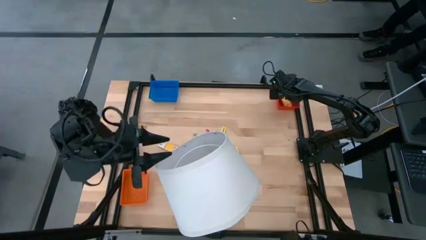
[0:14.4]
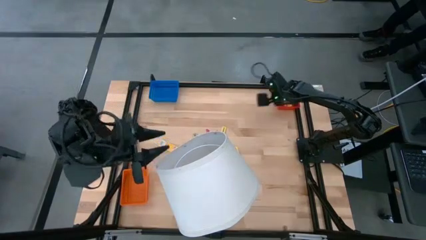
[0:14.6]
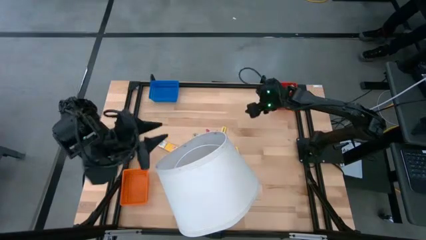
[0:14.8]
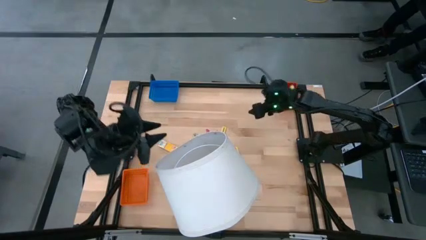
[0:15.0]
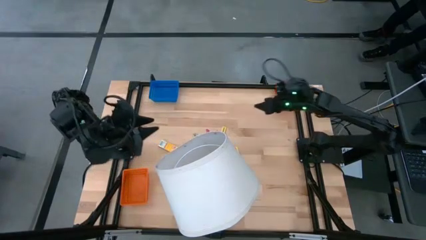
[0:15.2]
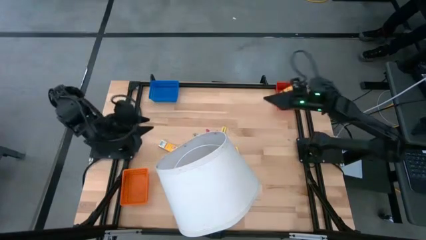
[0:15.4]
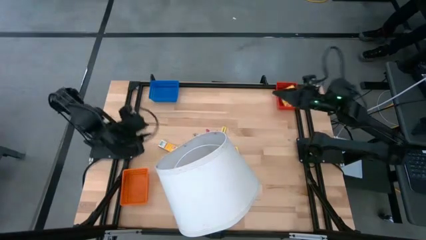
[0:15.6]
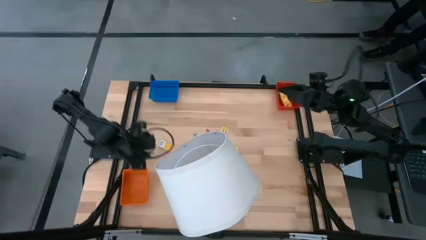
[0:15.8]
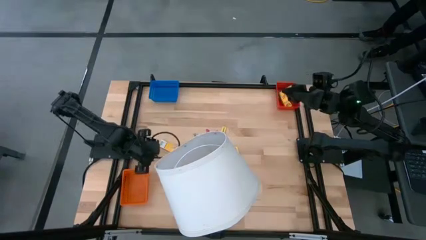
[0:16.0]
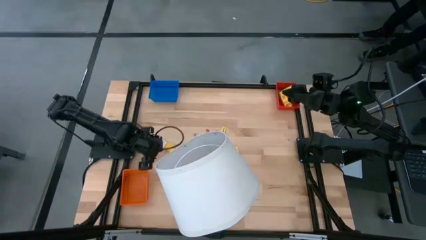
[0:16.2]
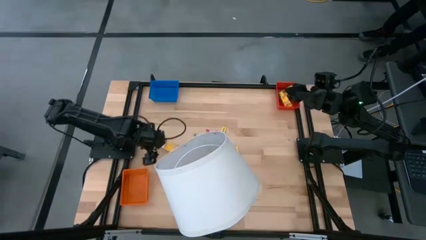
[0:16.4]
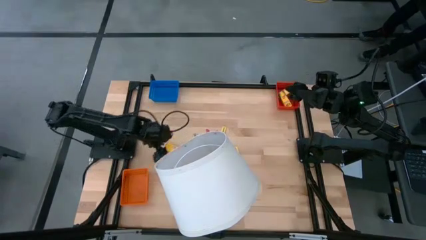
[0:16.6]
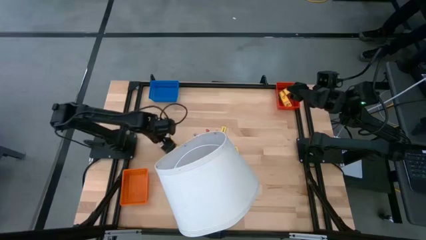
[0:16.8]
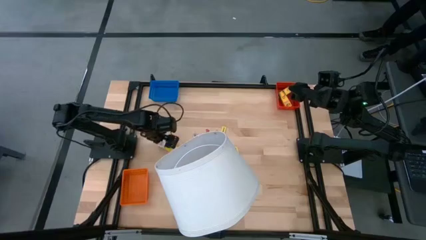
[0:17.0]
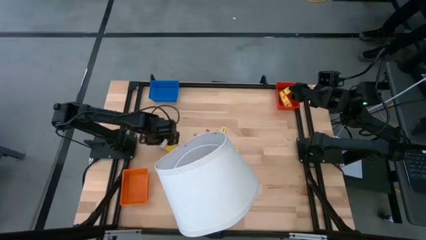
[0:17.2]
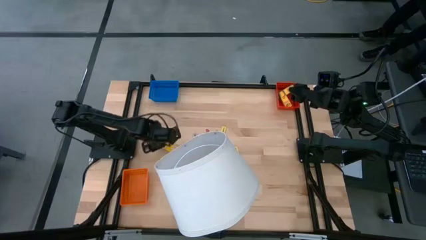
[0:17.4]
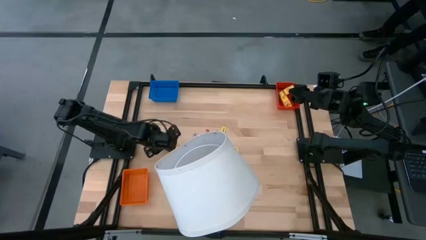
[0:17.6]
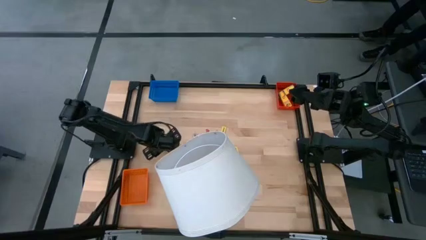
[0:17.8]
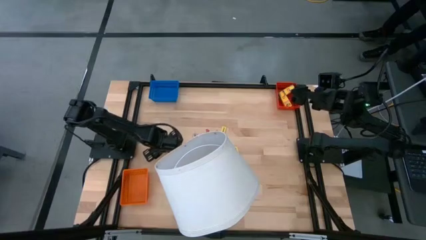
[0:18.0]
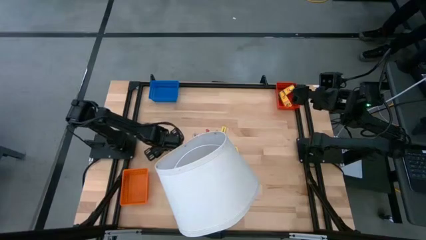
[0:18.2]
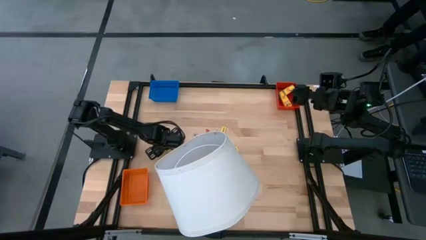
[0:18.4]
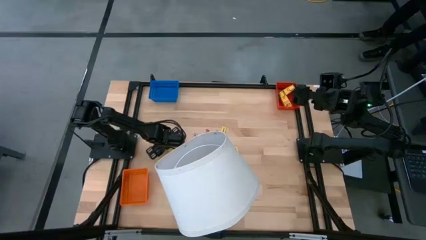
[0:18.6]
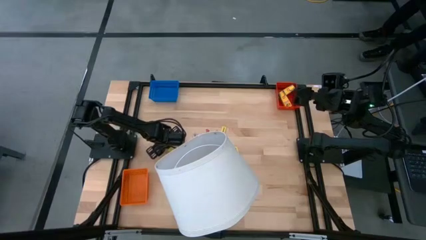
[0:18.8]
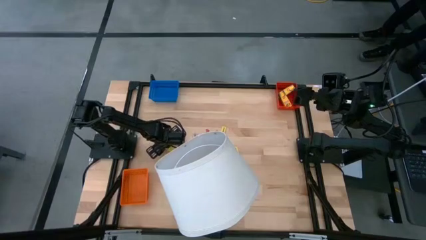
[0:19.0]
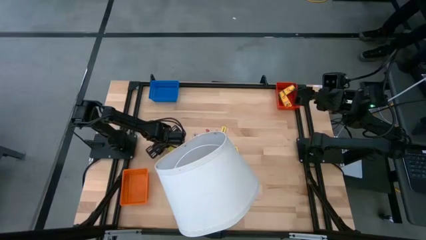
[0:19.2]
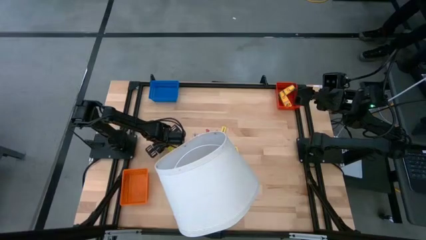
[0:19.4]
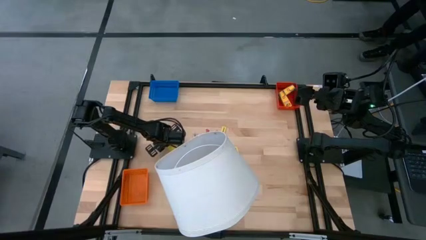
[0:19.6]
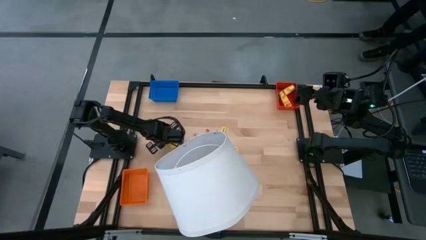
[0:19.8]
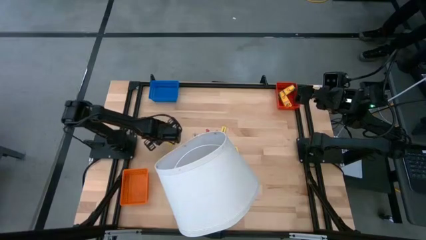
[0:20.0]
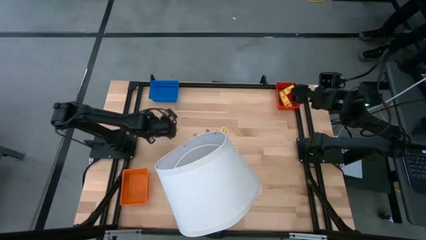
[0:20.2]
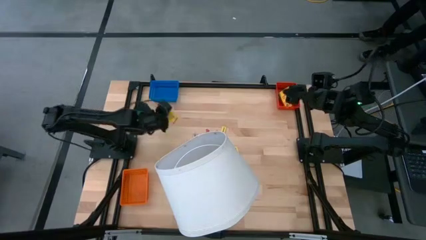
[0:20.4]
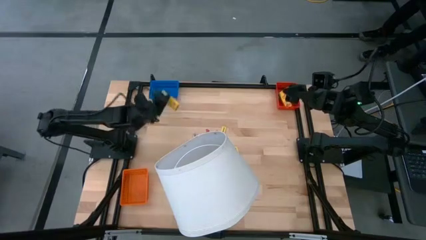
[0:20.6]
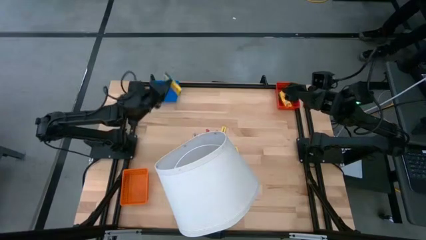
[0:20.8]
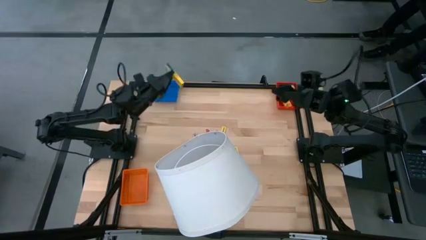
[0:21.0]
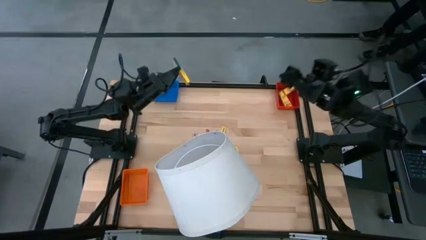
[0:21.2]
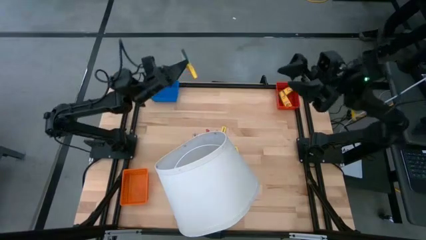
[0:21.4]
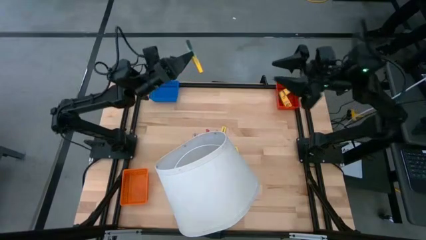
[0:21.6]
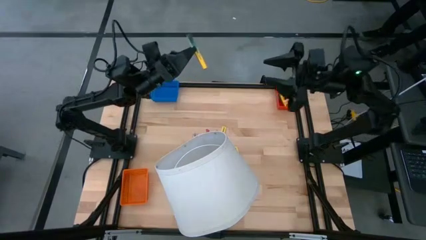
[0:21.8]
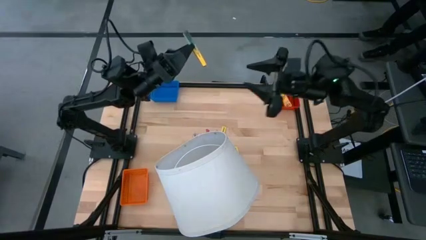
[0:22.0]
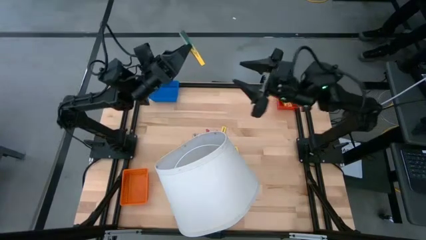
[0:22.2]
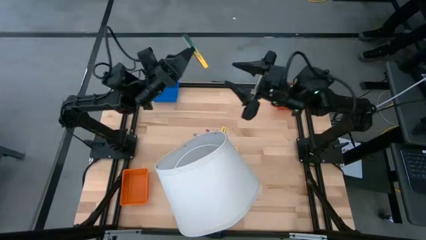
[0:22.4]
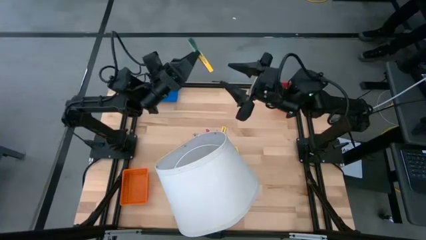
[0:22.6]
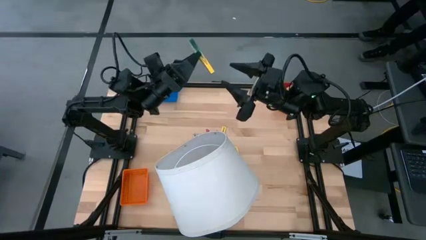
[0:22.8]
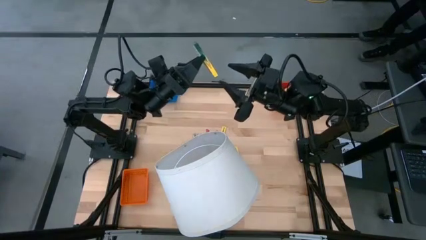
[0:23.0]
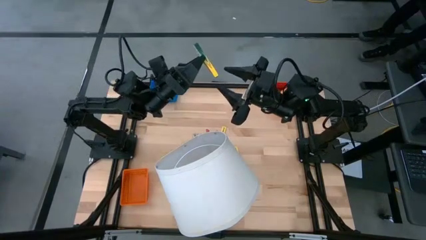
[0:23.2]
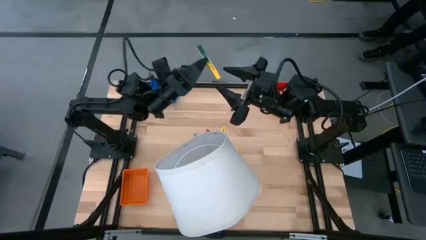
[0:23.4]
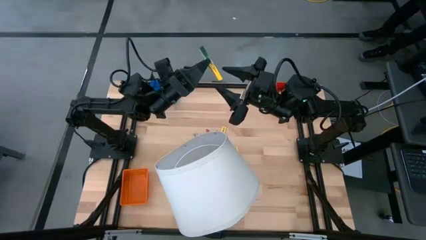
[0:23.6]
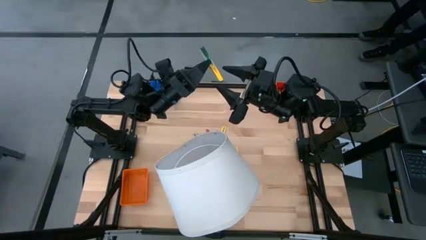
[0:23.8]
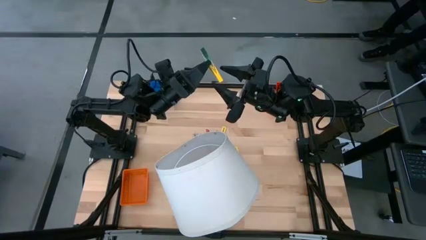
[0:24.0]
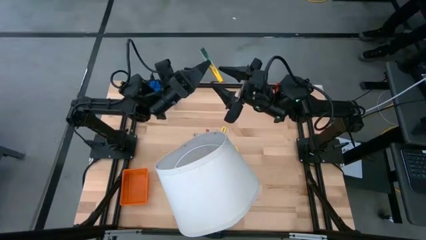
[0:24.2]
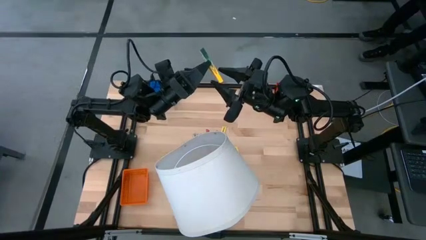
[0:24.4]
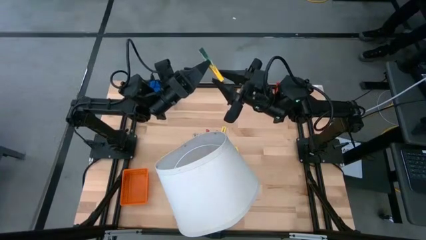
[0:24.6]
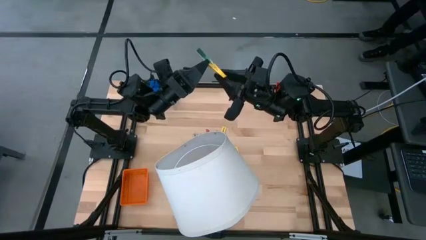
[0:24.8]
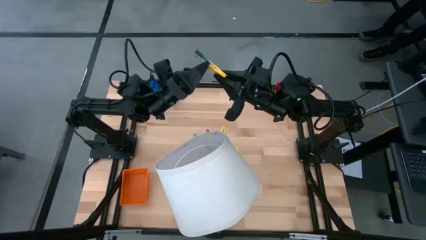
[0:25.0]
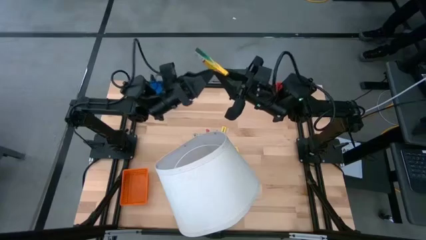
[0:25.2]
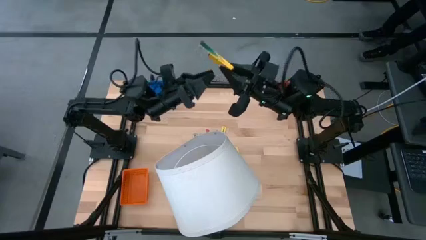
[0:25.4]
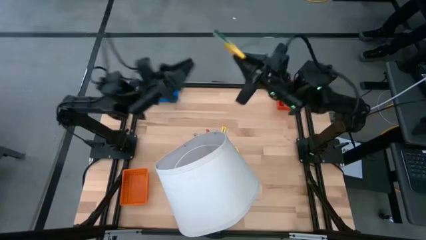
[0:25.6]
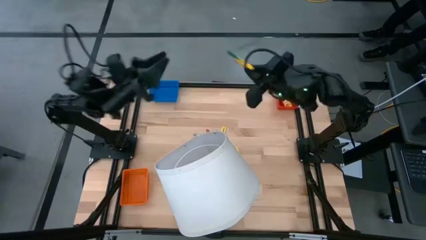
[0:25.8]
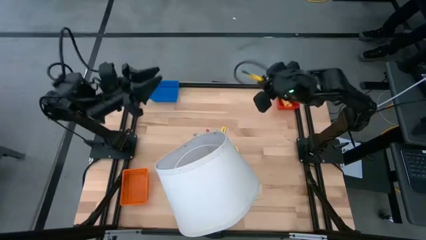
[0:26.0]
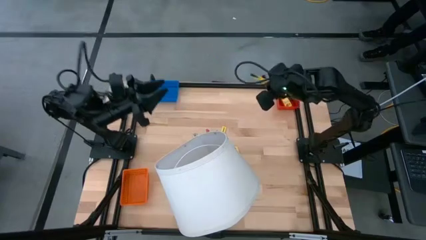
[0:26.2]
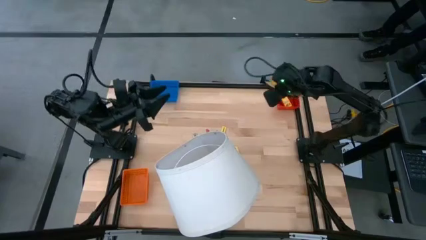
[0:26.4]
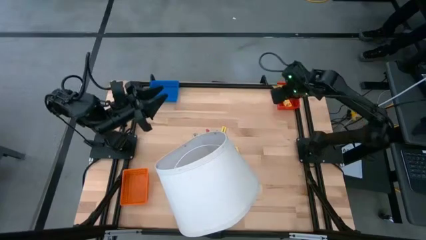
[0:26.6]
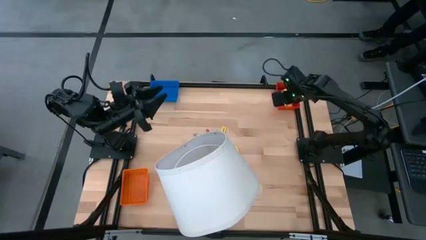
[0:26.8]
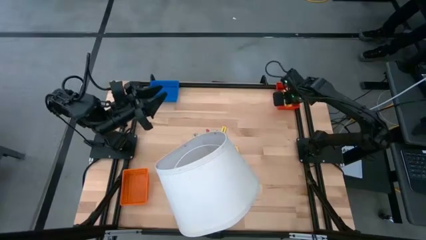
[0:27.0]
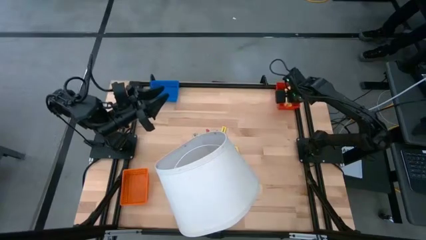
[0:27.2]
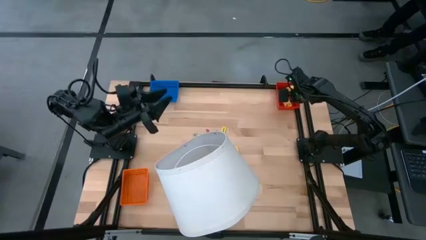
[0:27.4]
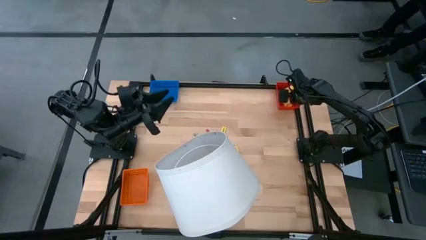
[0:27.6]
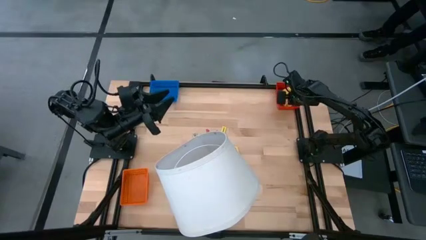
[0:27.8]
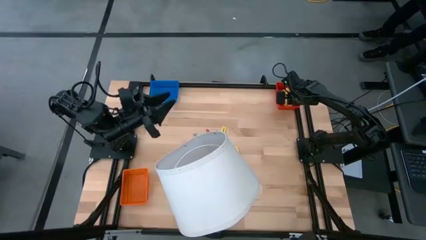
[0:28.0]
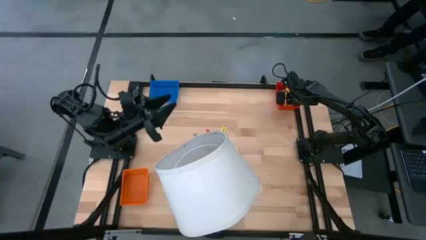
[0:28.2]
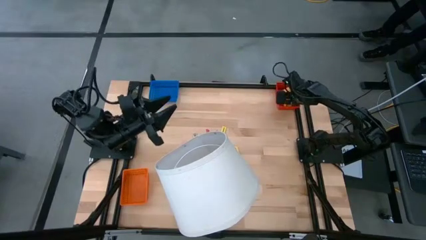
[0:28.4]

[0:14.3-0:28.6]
Task: Pick & Place School Supplies
Put the yellow crayon box into the red basket
